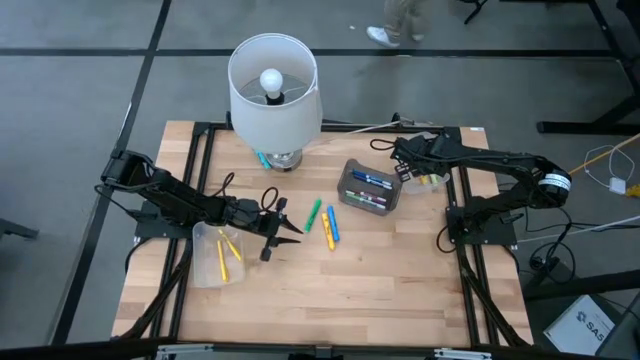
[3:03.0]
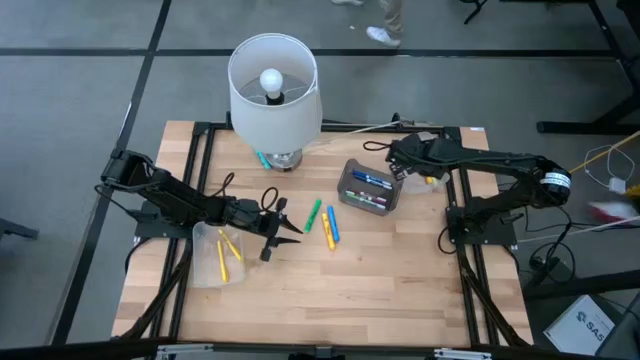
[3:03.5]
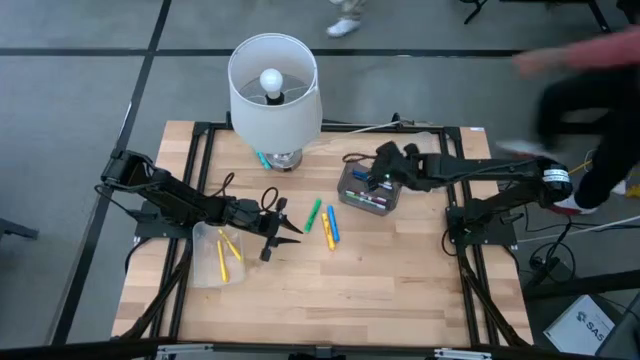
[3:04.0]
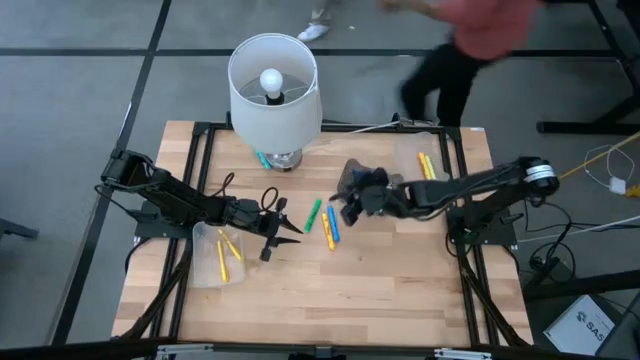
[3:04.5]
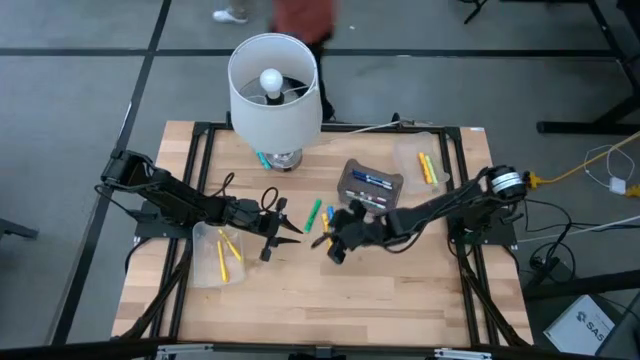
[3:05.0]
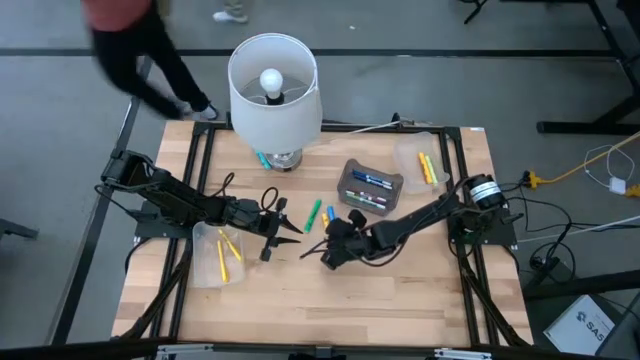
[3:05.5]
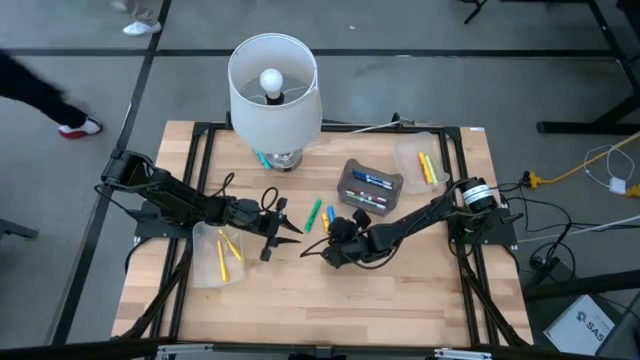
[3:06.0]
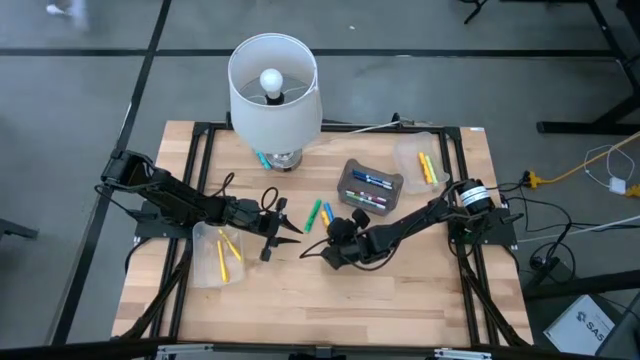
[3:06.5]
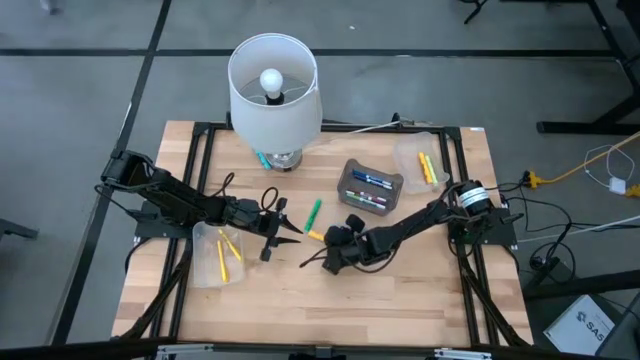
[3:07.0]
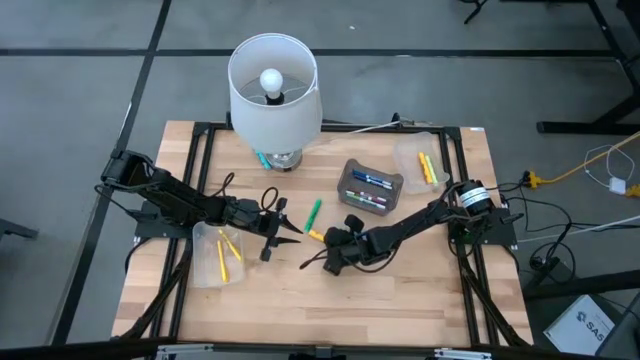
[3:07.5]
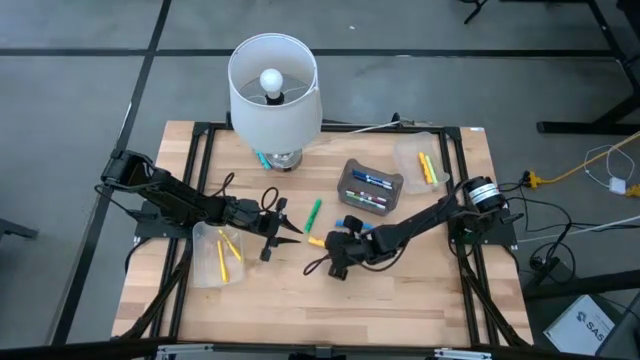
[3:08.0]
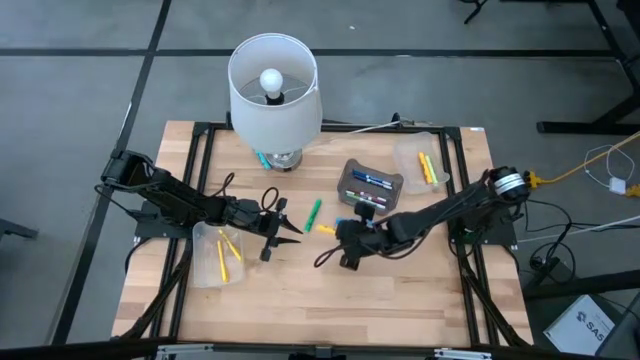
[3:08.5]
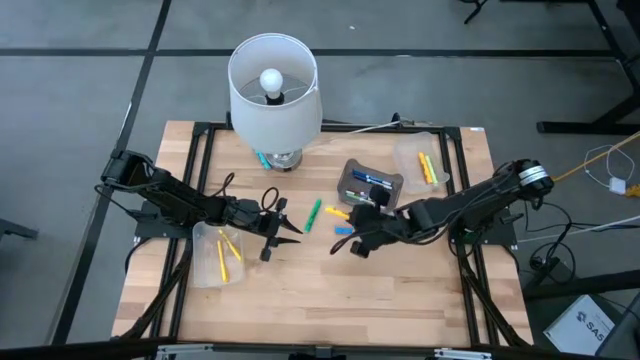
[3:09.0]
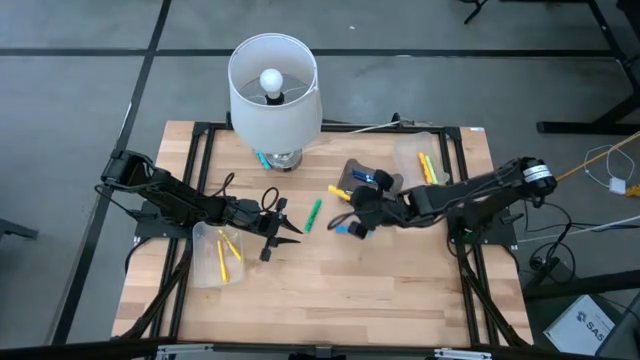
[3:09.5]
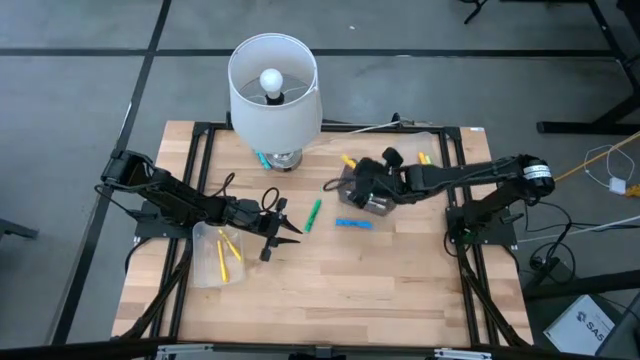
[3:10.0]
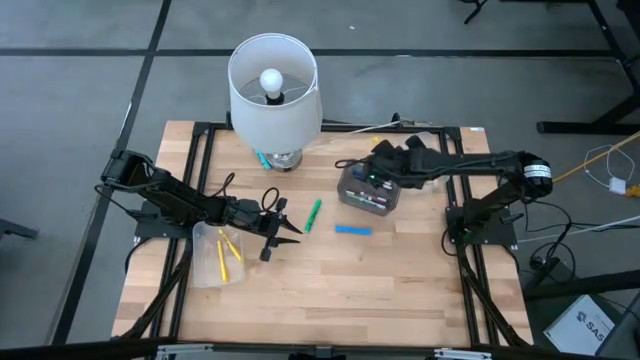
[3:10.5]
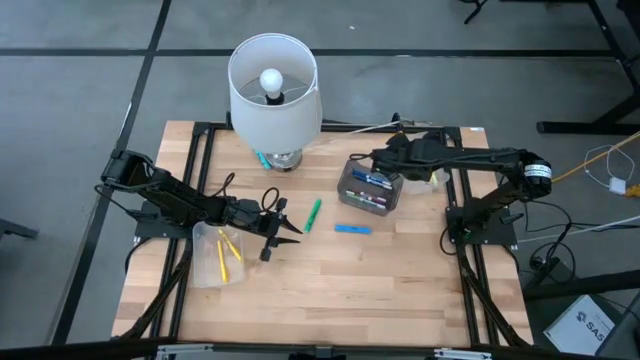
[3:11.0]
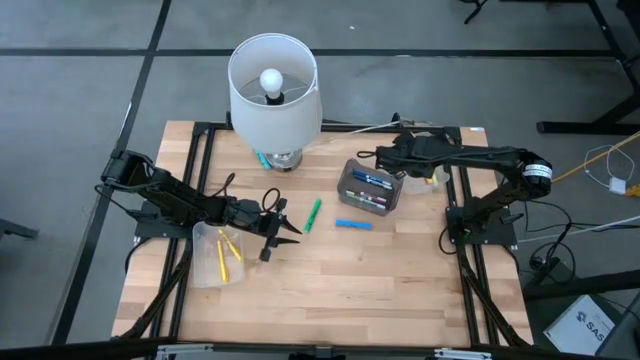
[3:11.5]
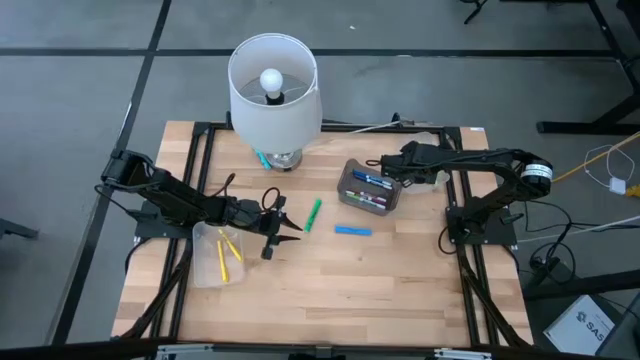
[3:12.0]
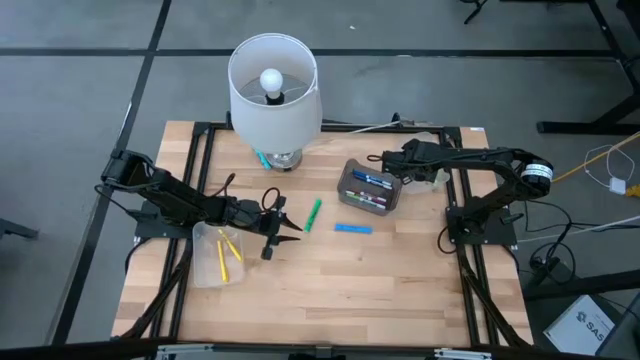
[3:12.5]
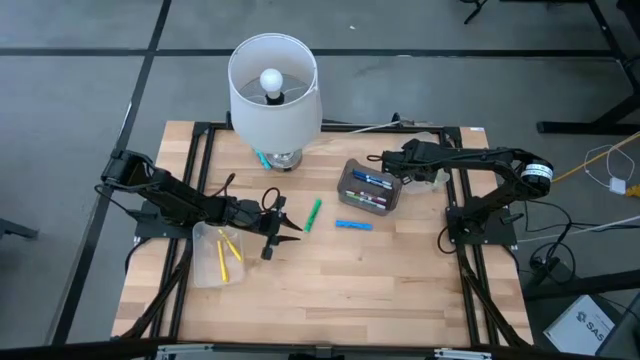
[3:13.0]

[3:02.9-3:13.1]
Task: Pick & Place Markers
Put the yellow highlighter pen into the right transparent bin

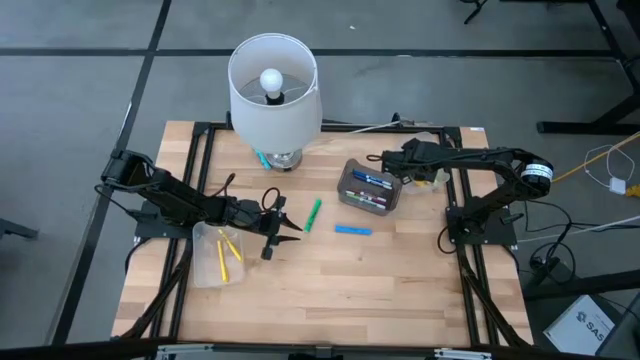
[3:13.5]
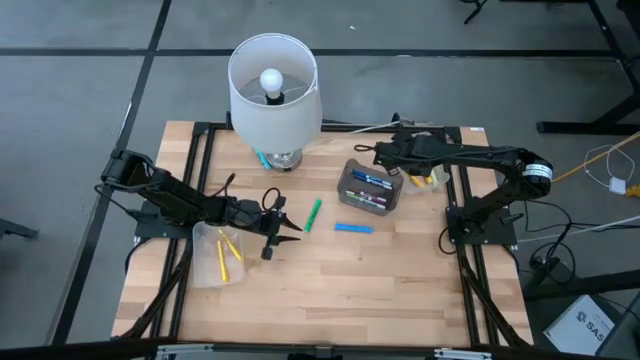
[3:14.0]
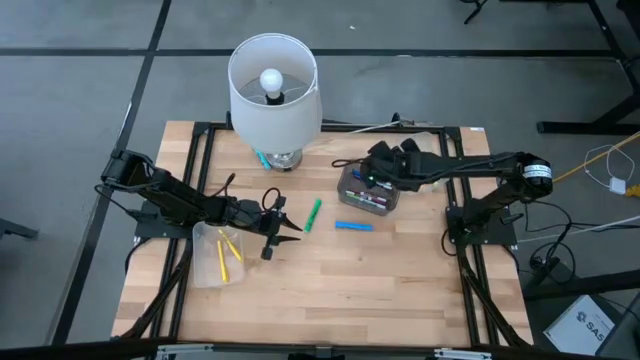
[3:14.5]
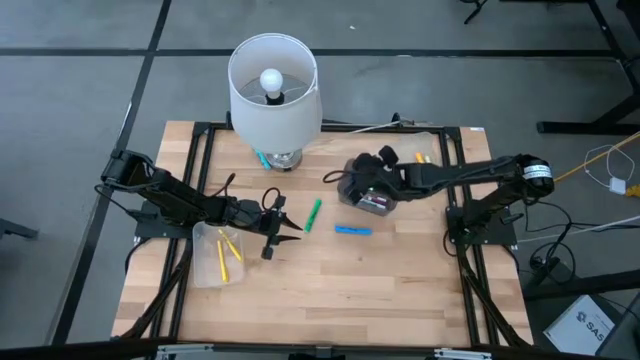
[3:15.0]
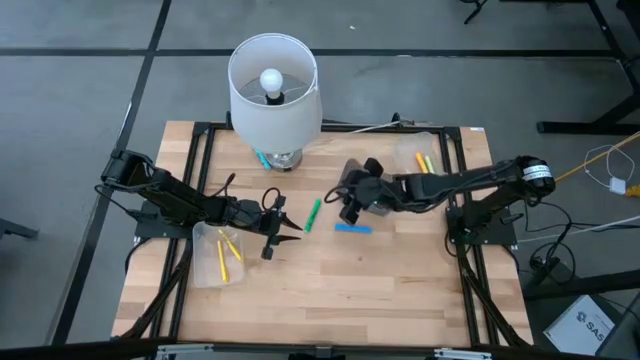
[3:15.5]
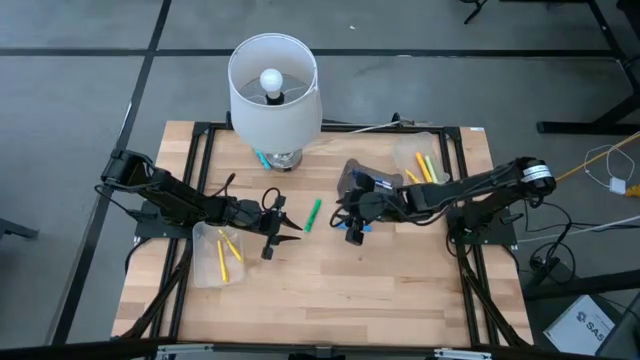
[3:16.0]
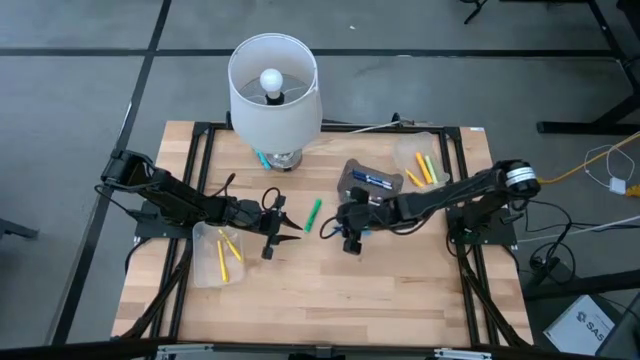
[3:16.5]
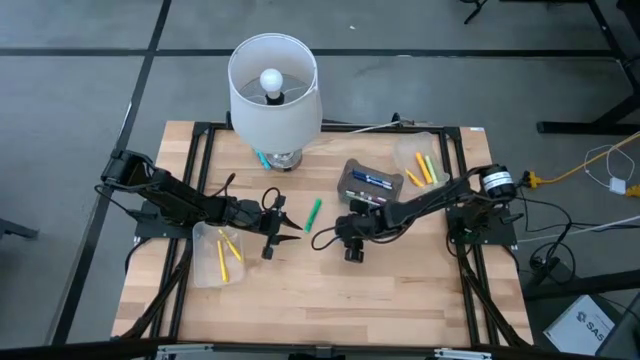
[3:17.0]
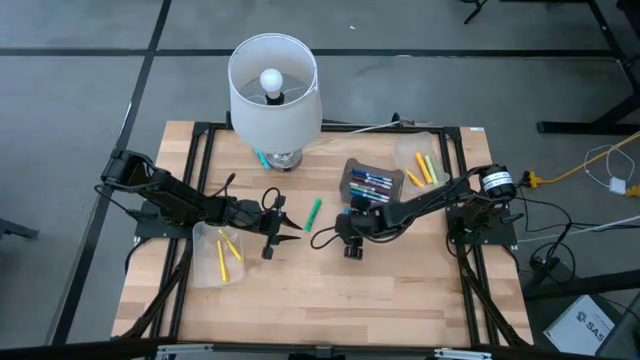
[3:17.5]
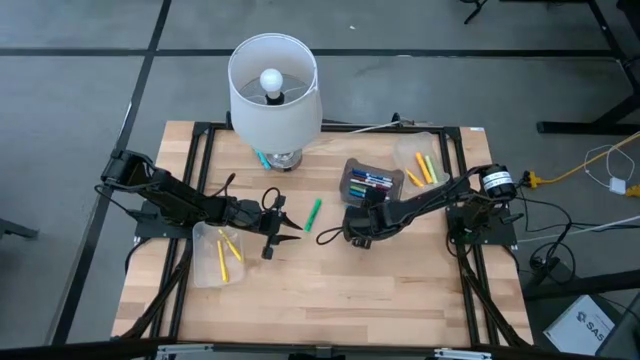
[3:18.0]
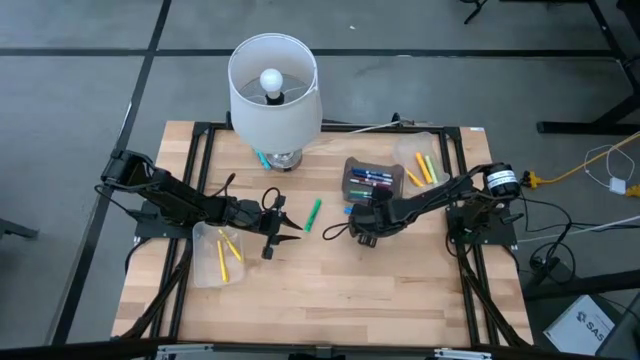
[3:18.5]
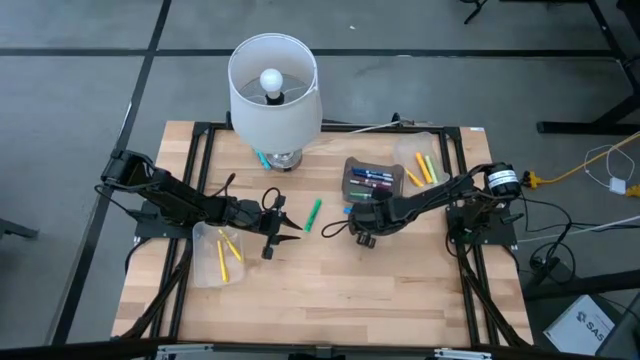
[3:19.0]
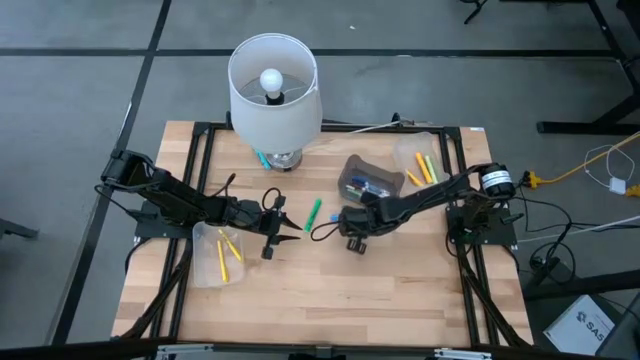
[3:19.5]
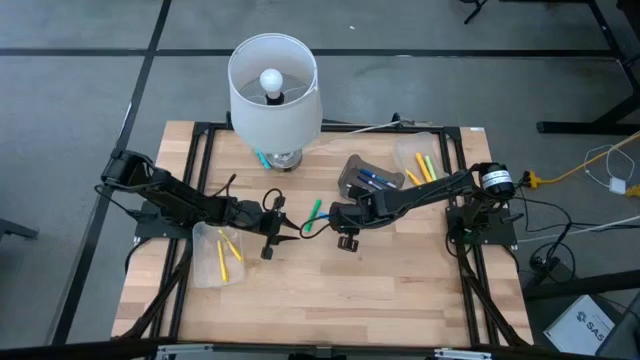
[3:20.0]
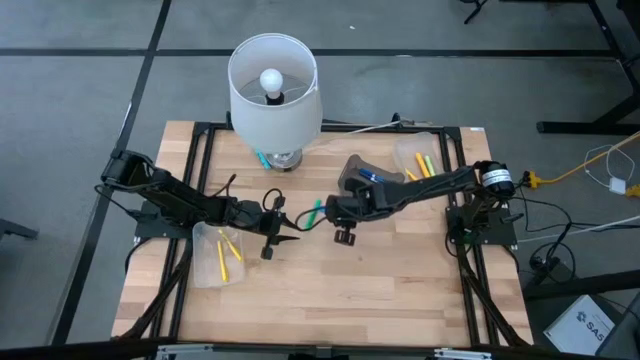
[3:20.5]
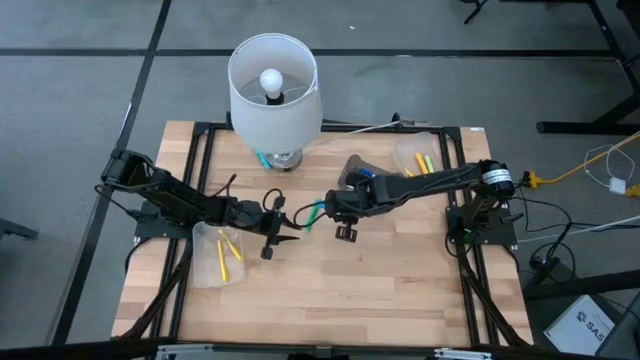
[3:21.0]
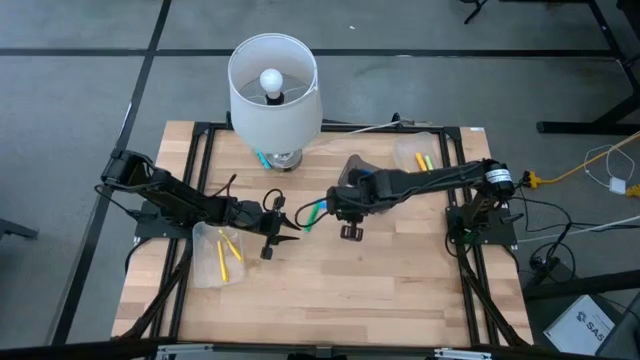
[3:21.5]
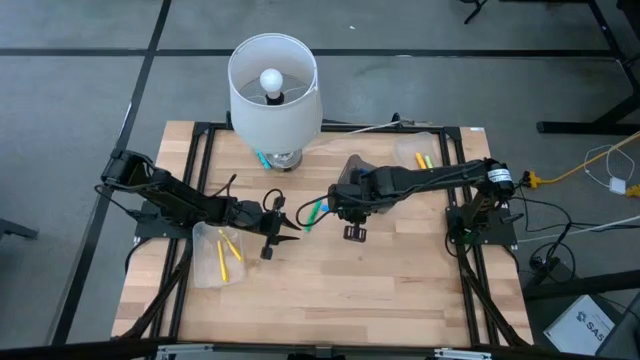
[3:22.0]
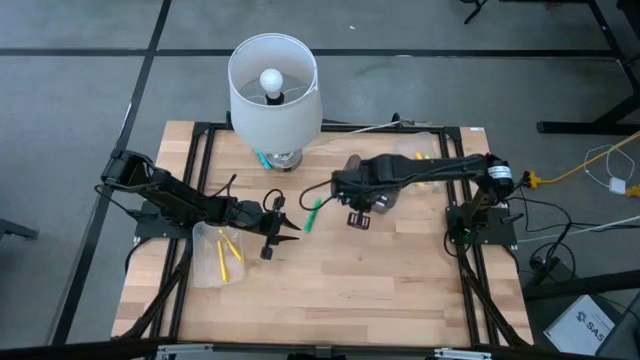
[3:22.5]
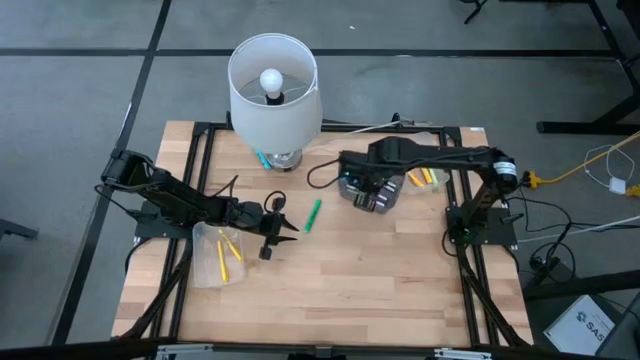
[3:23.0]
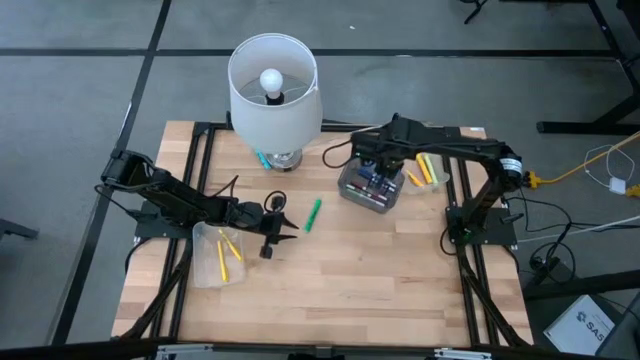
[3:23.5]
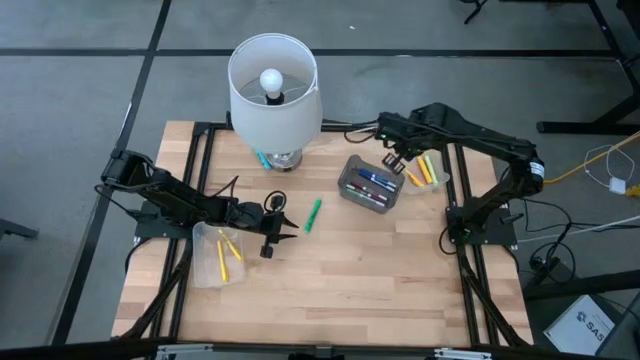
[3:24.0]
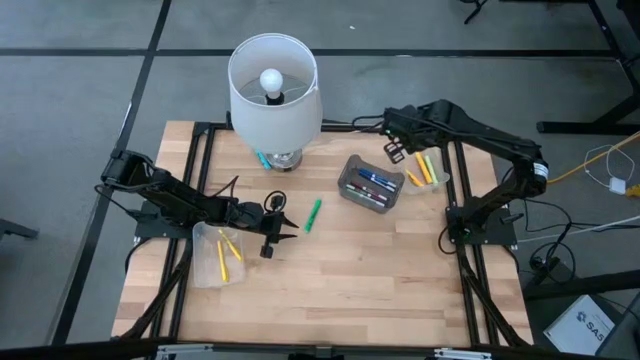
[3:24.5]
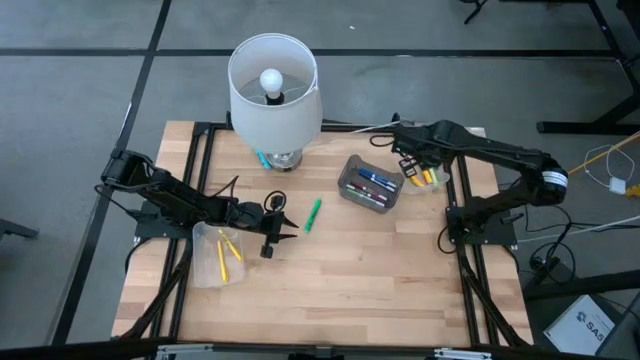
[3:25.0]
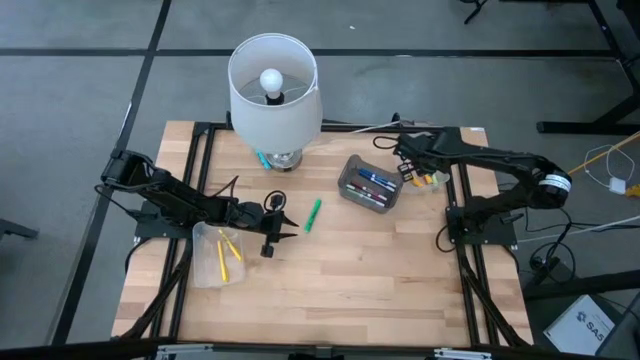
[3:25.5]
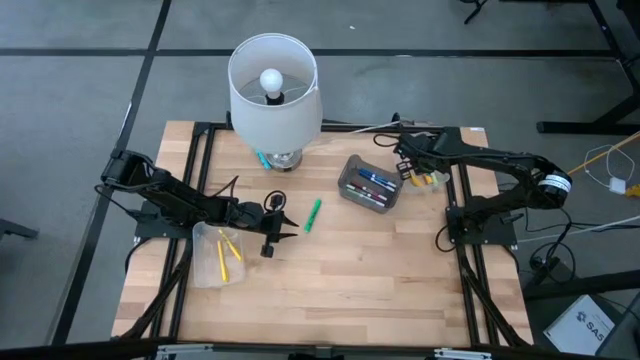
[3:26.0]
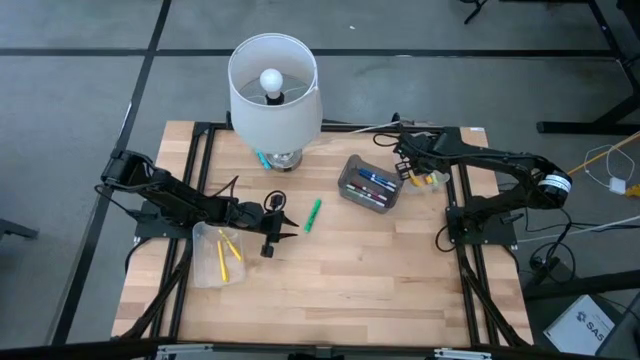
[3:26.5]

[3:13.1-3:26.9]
Put the blue highlighter pen into the right transparent bin
